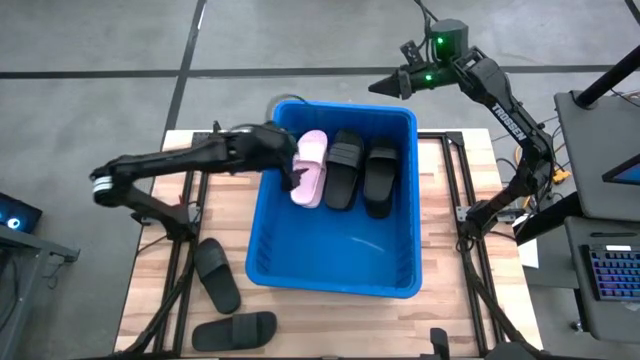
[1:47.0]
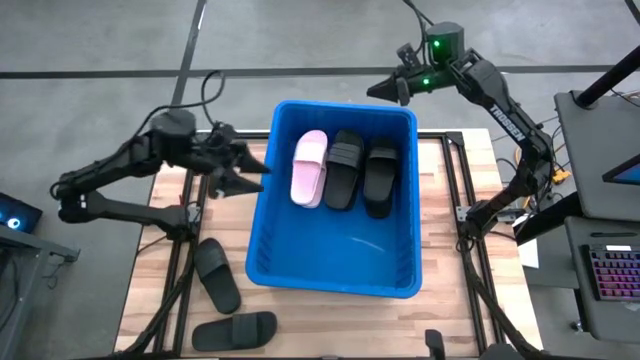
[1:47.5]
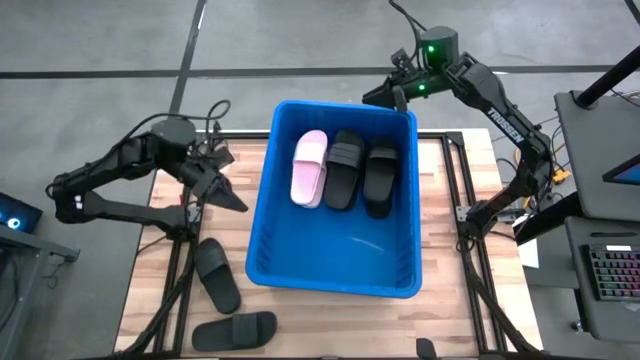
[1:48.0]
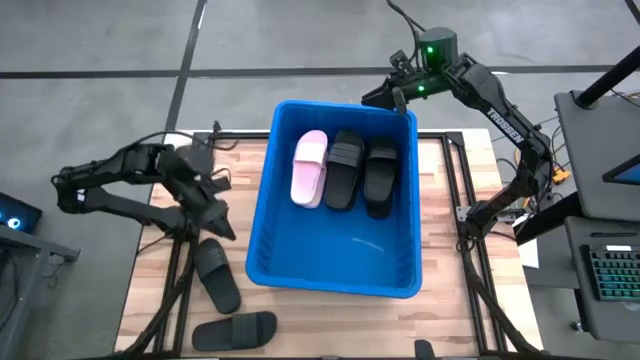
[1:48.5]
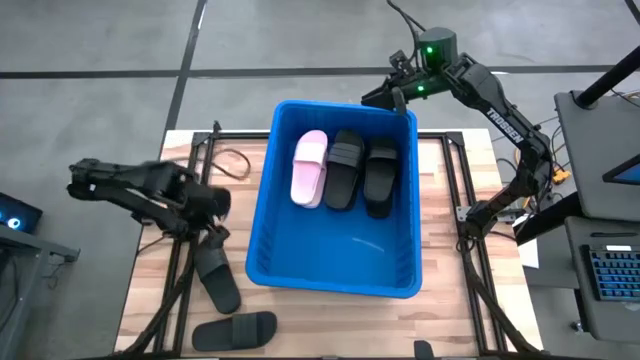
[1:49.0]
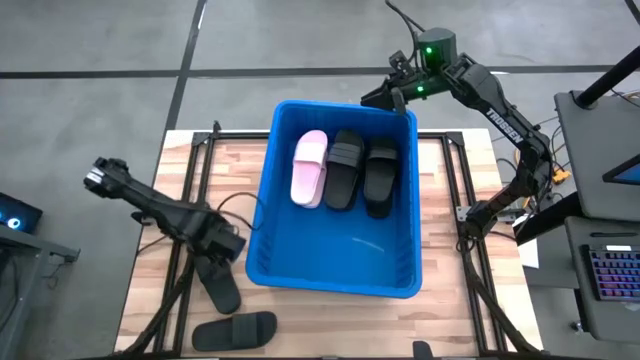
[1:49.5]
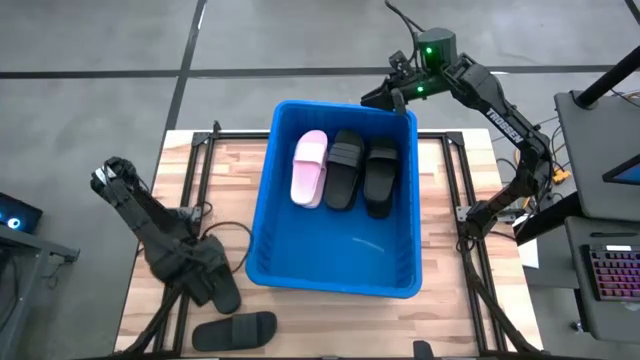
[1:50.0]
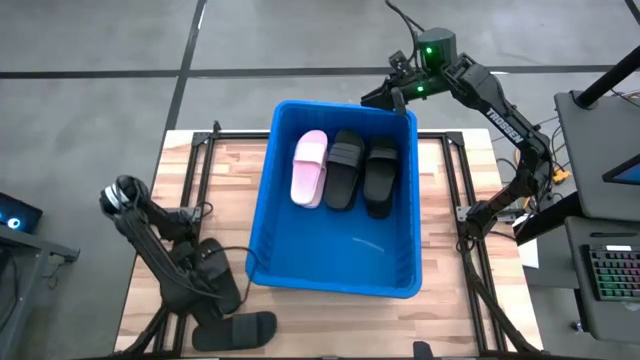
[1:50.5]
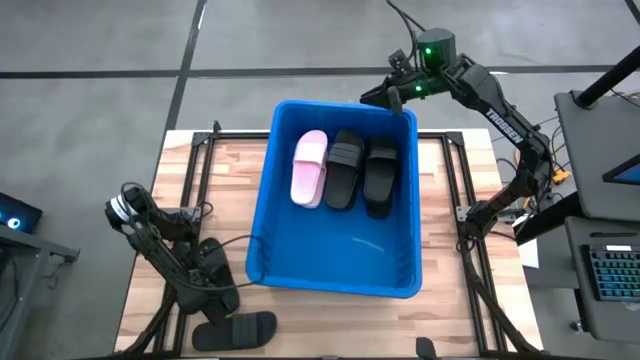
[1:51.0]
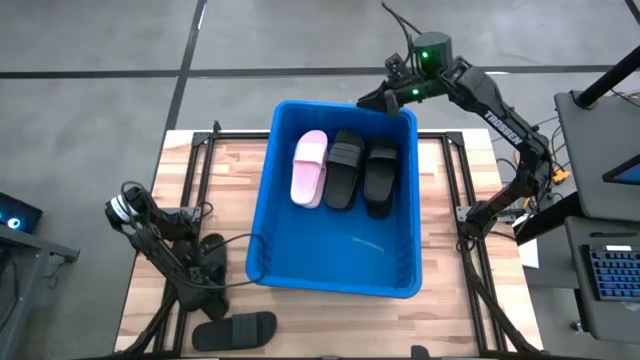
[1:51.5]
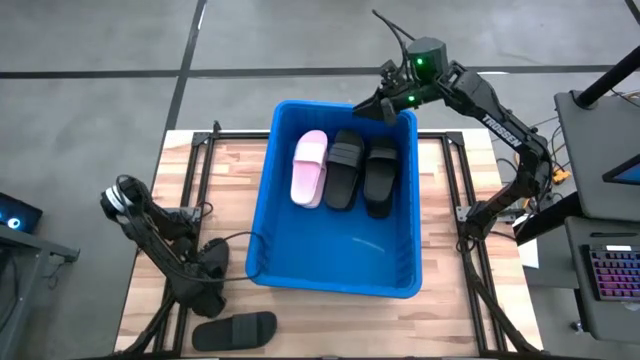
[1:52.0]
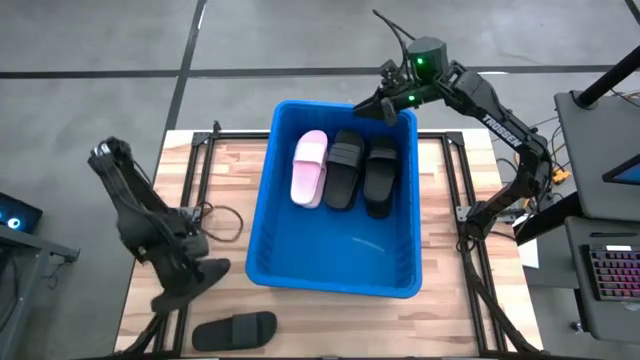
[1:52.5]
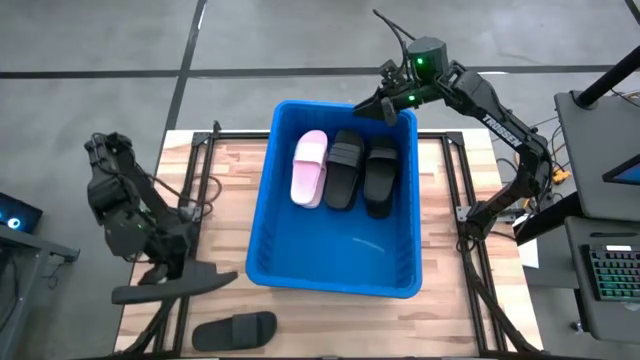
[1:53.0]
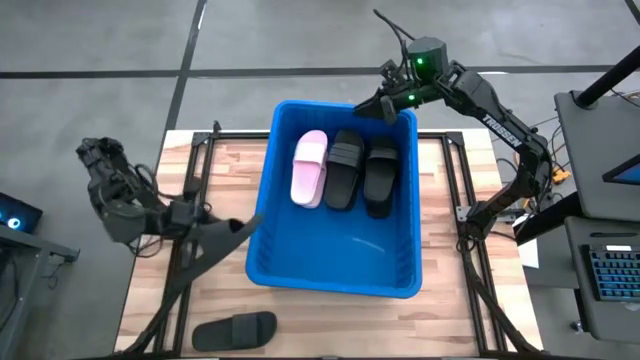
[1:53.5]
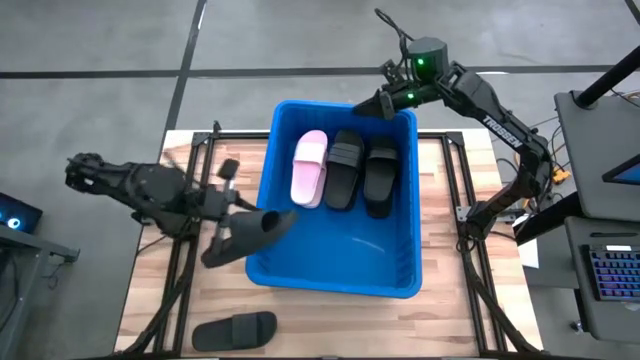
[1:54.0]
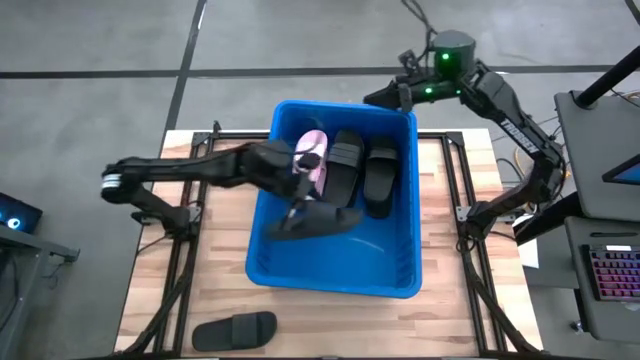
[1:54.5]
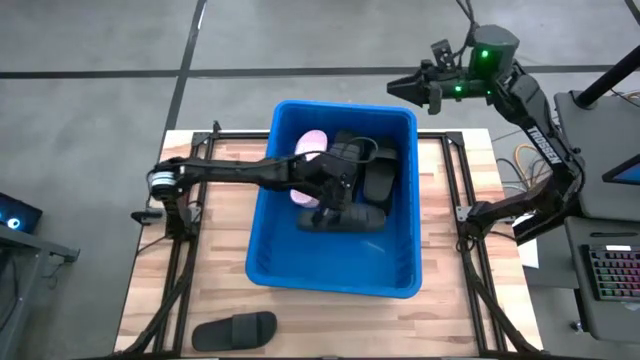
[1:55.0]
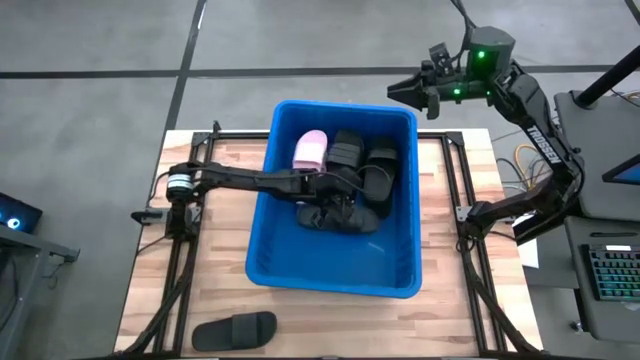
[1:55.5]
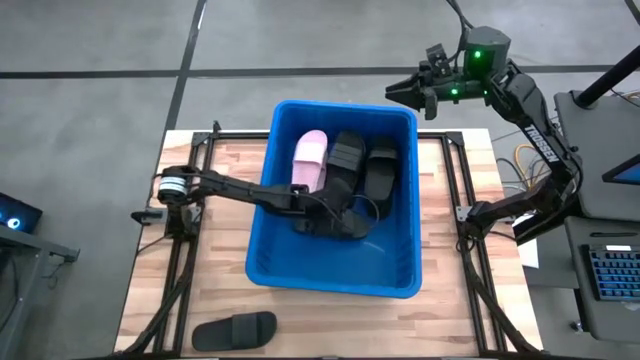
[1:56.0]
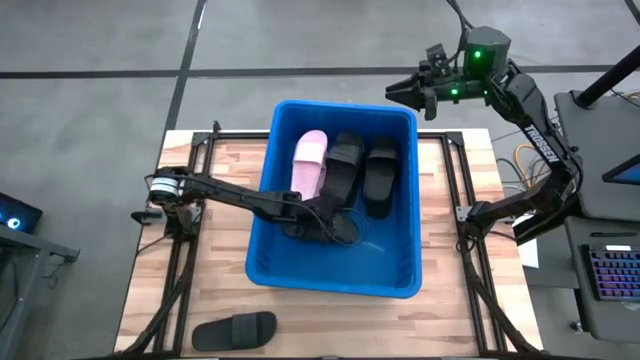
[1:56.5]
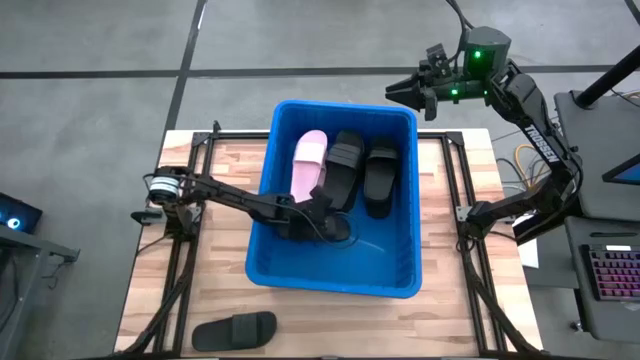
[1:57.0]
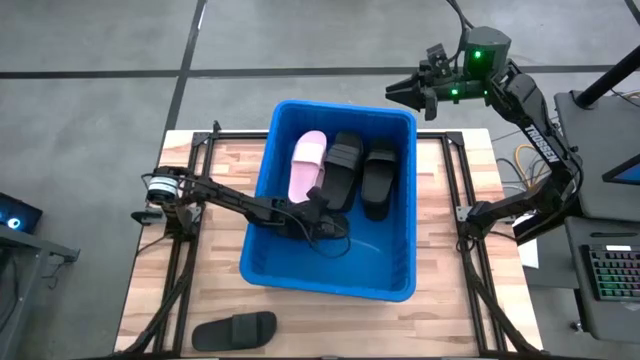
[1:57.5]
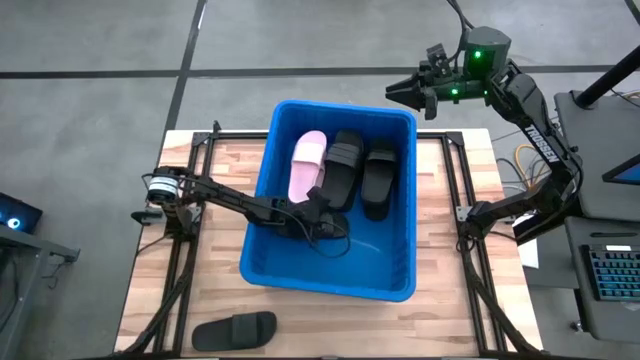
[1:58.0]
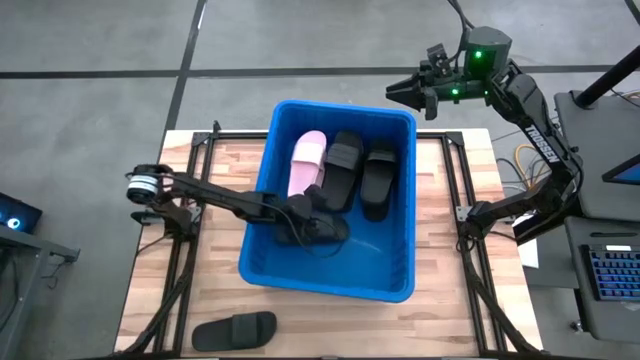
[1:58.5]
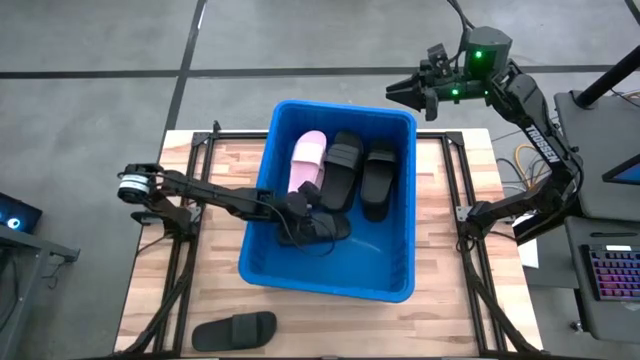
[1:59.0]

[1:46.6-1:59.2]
Task: Pick and place slides into bin
Put the black slide into the blue bin

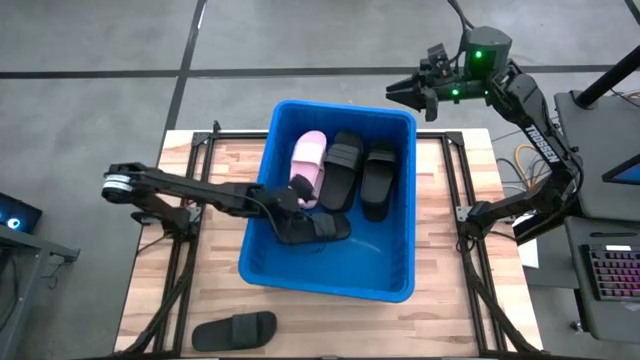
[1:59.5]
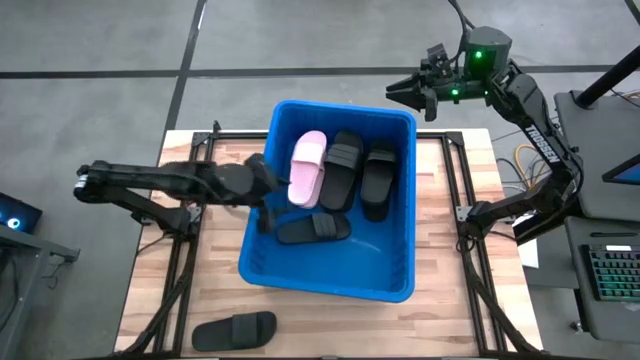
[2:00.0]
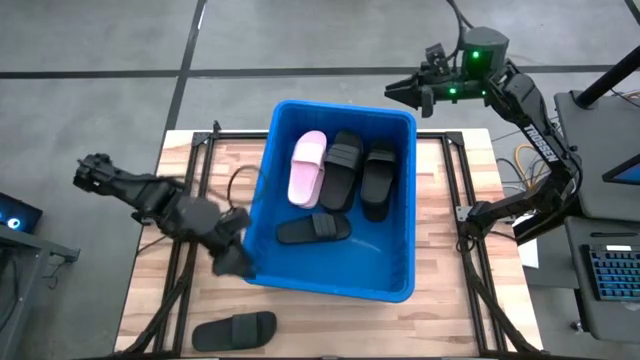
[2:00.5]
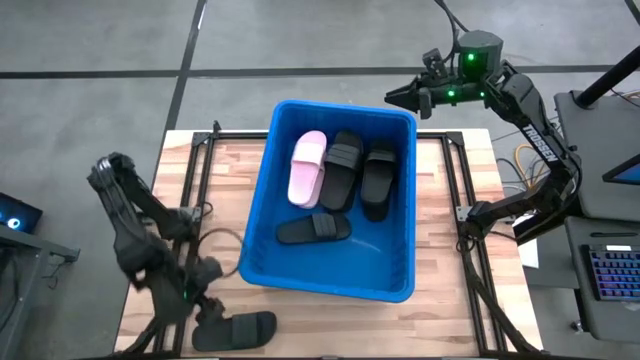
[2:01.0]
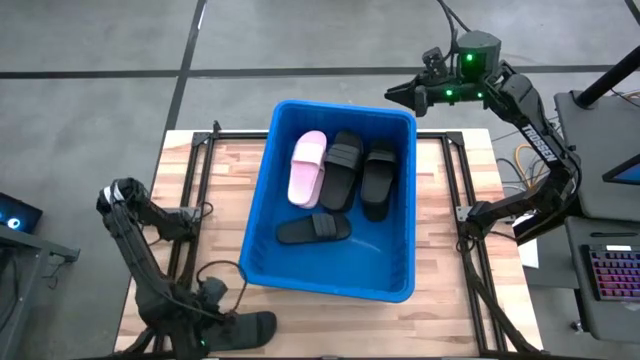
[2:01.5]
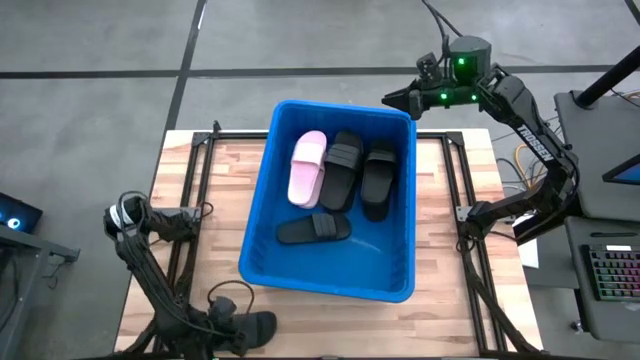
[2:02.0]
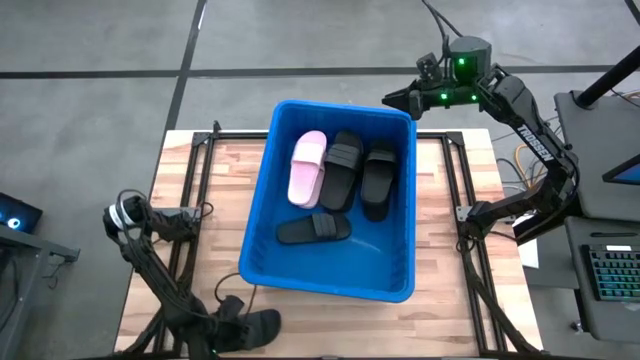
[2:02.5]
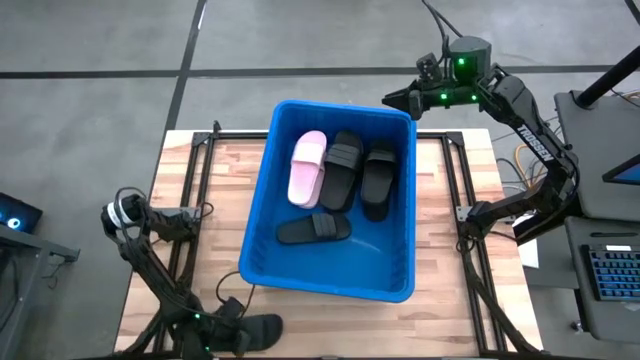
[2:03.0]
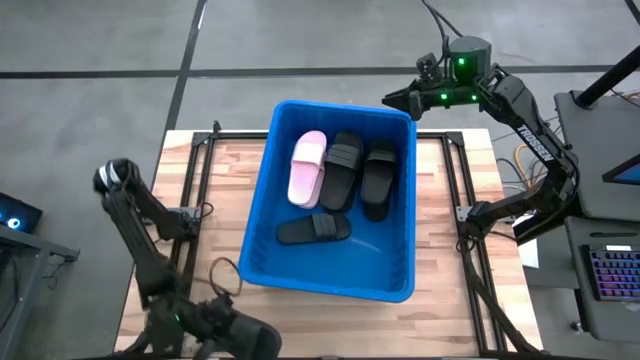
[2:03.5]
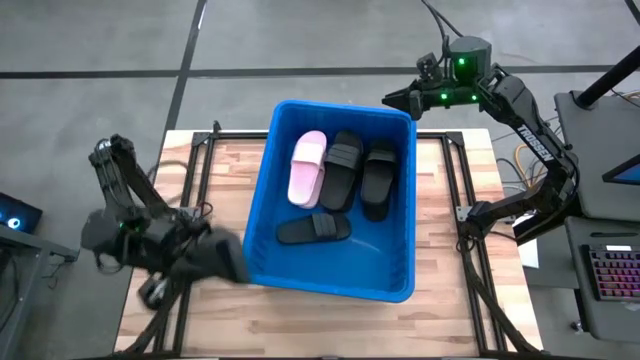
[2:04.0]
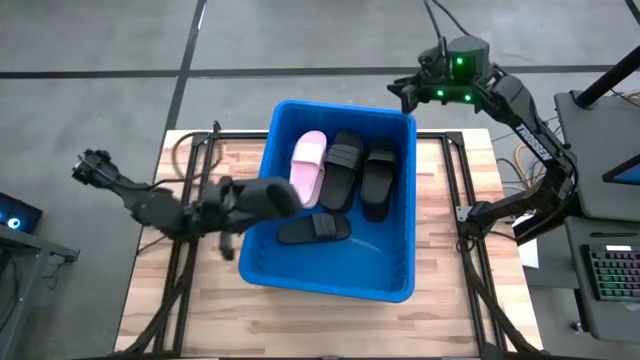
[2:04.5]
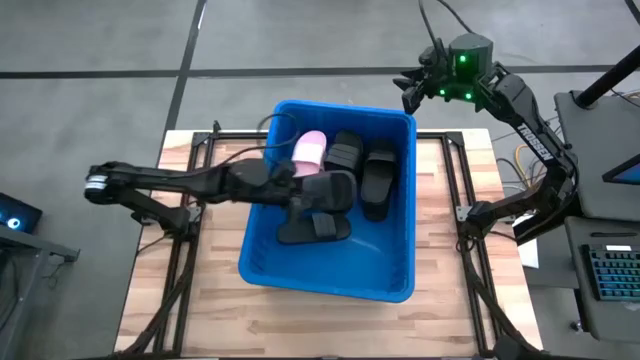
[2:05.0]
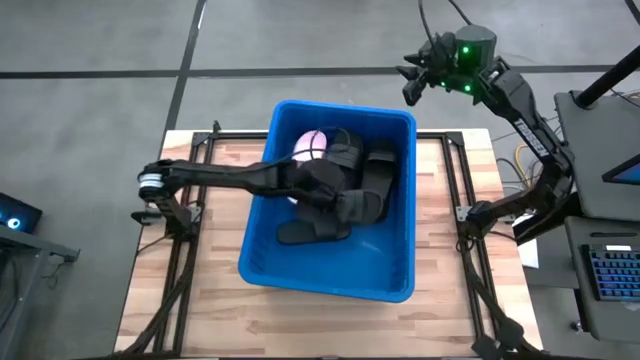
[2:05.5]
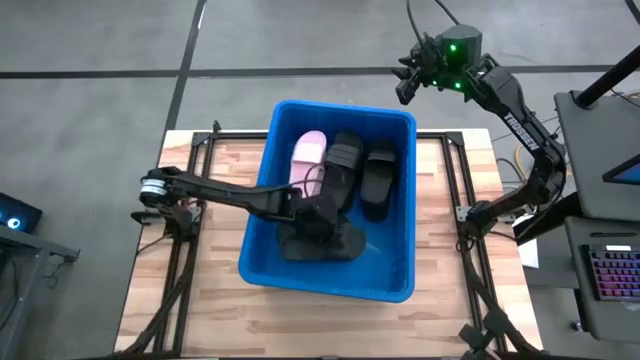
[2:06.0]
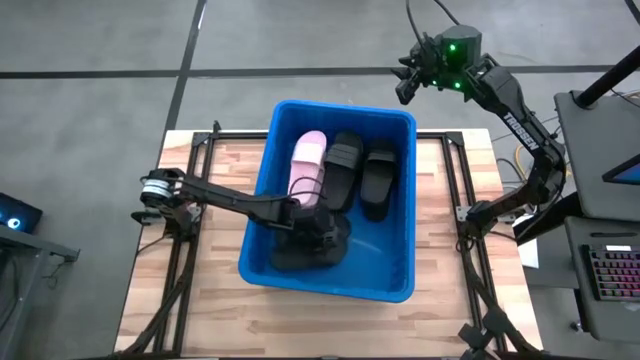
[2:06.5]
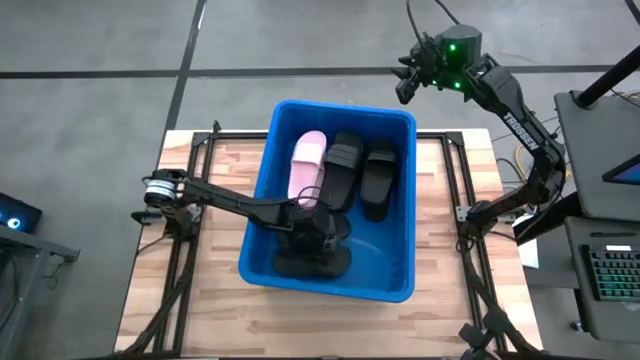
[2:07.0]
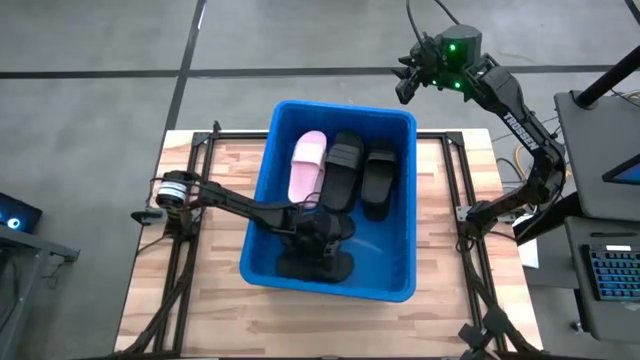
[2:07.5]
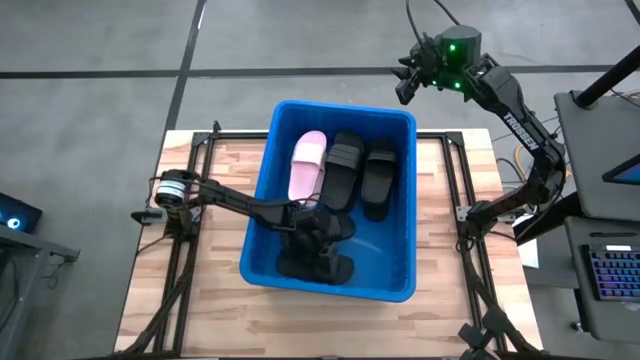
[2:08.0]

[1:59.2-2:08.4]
Put the black slide into the blue bin

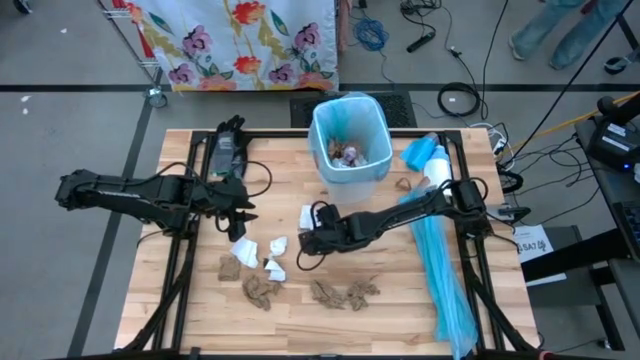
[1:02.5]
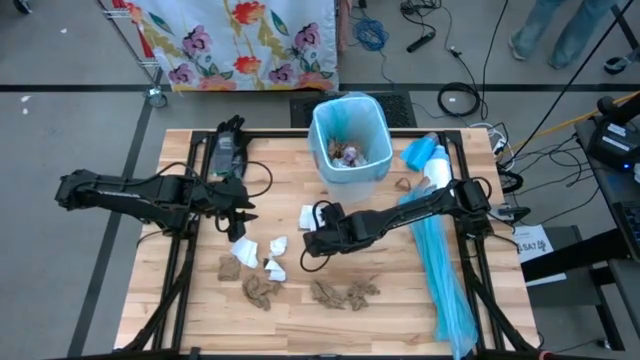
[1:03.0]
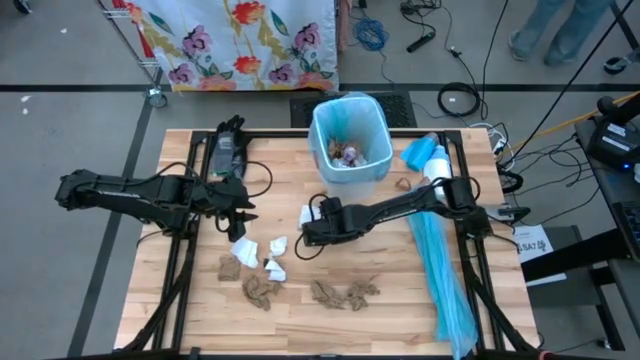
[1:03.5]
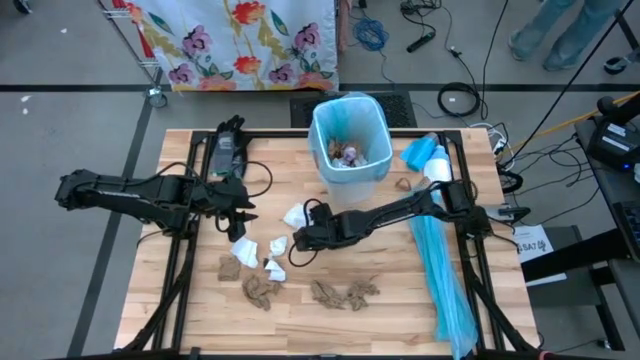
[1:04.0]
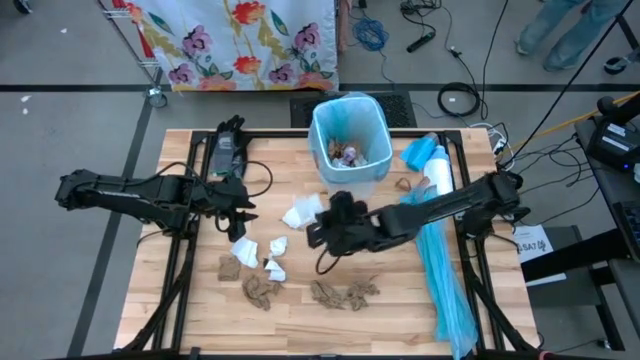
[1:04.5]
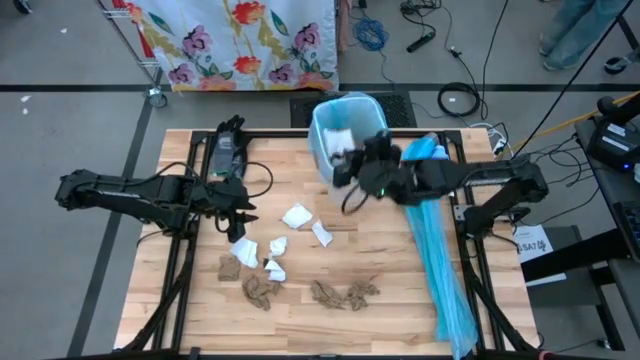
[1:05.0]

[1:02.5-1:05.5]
Task: place trash/remove bag and relplace
Put the piece of magazine into the trash bin
